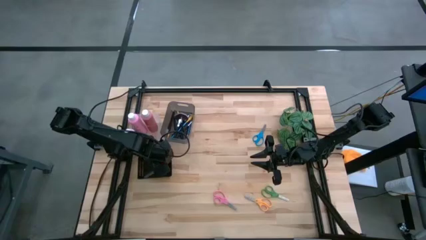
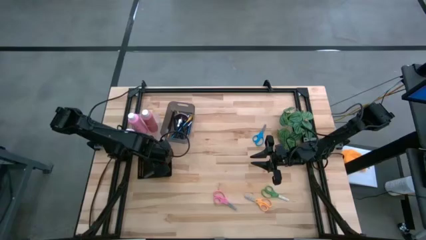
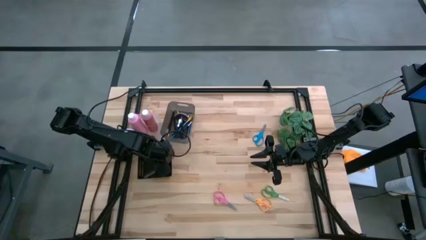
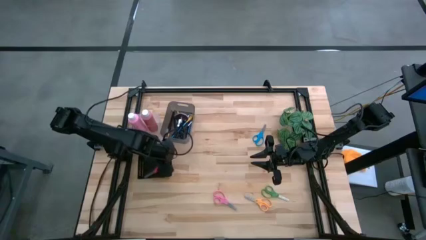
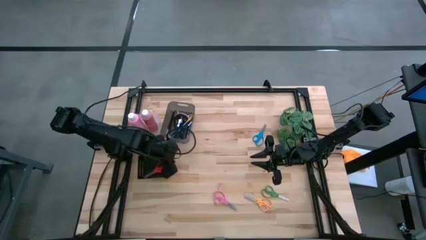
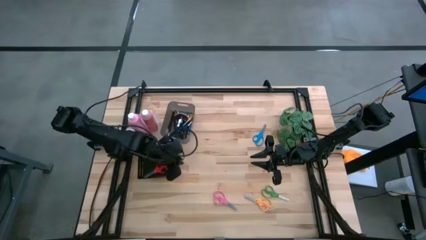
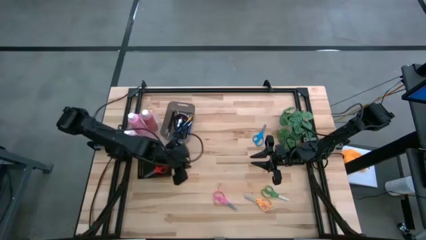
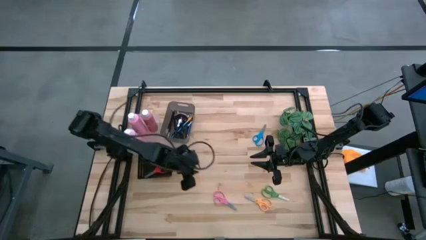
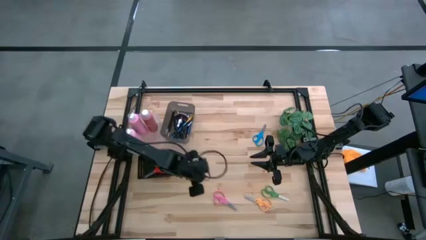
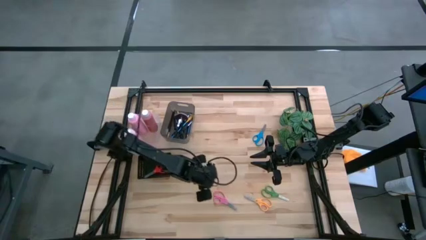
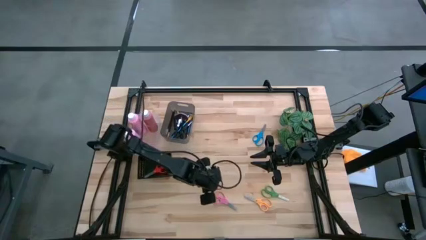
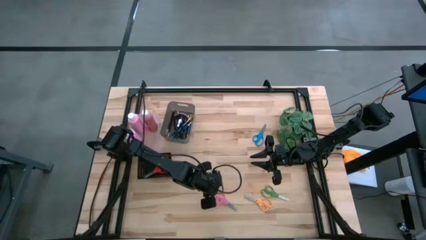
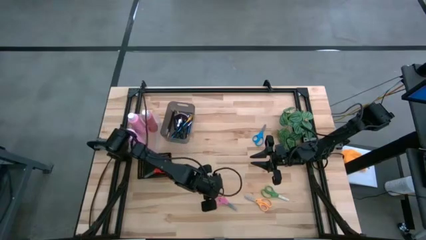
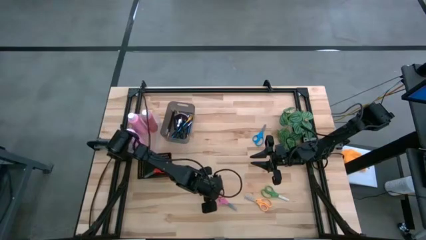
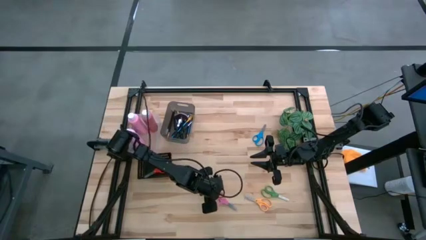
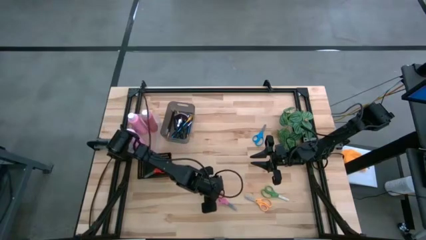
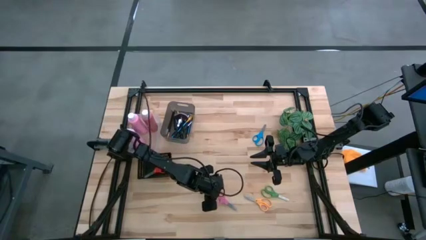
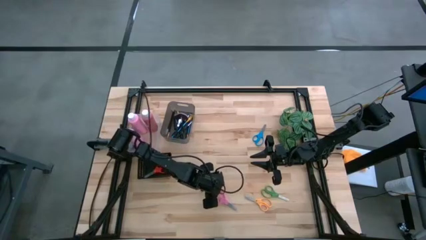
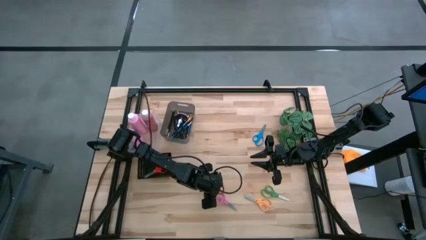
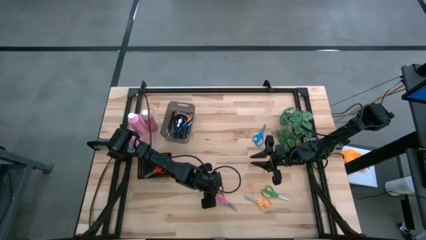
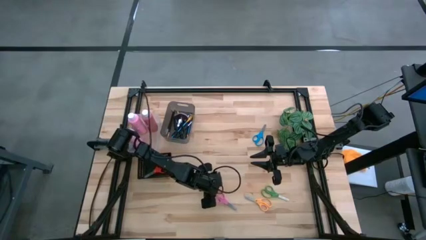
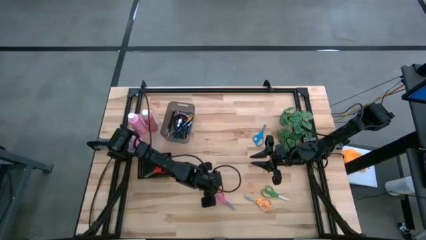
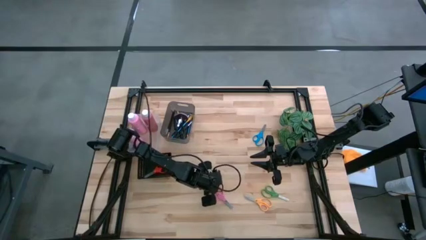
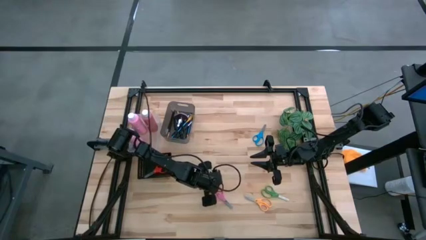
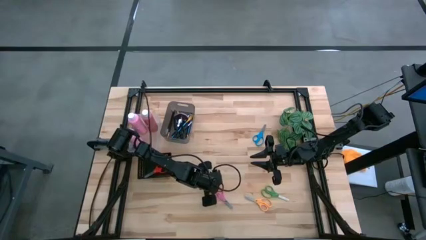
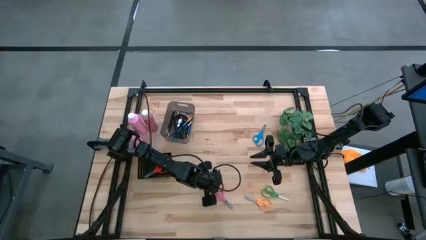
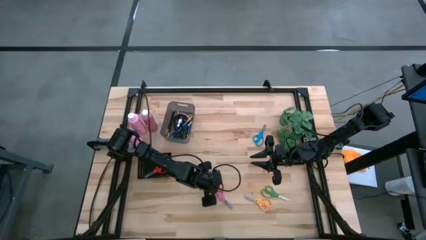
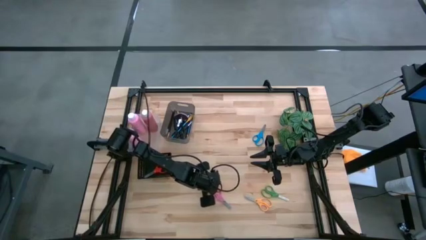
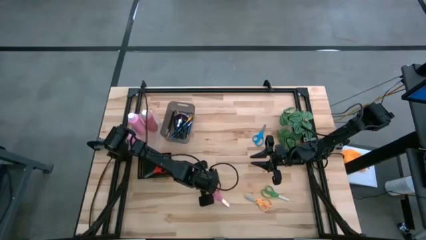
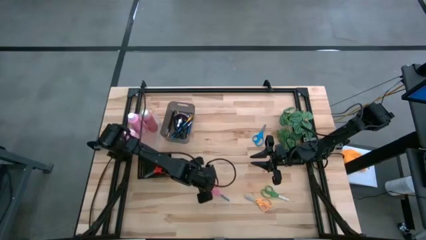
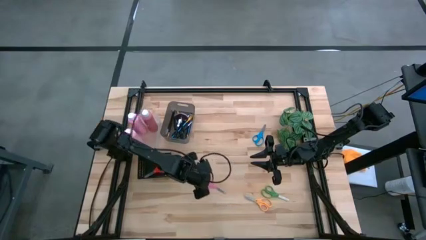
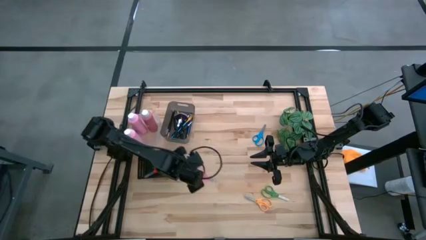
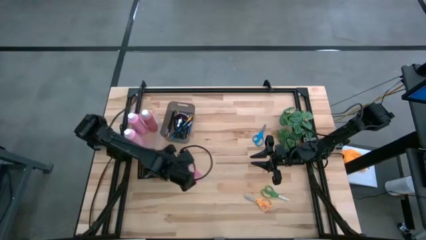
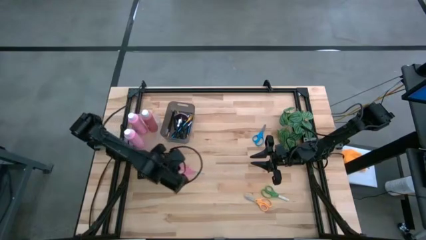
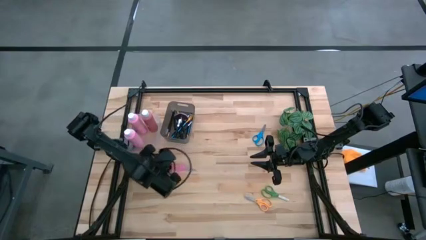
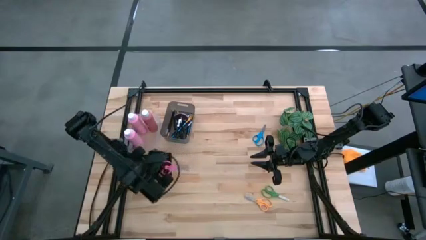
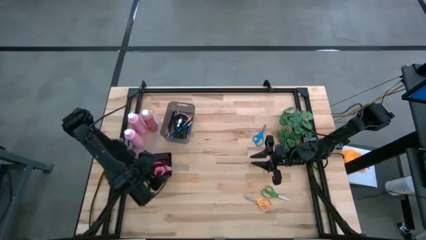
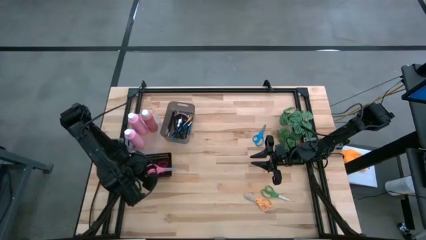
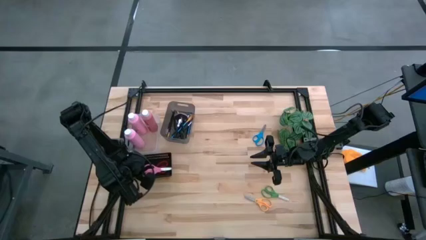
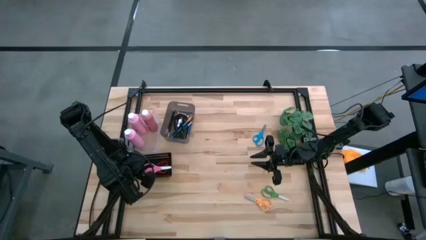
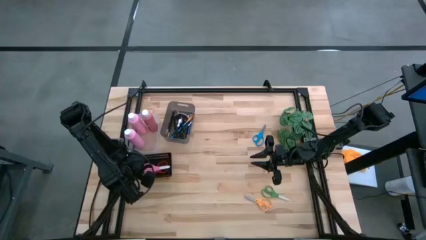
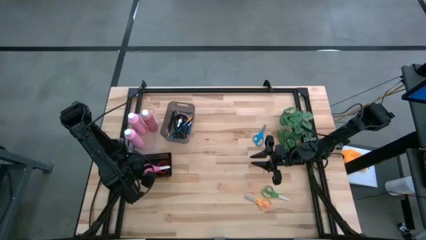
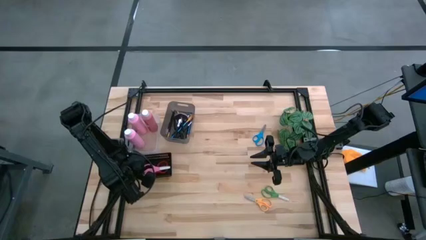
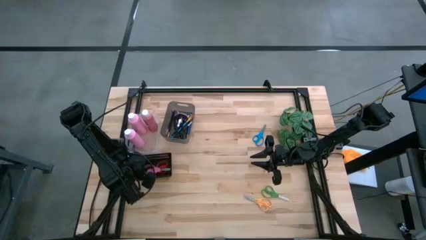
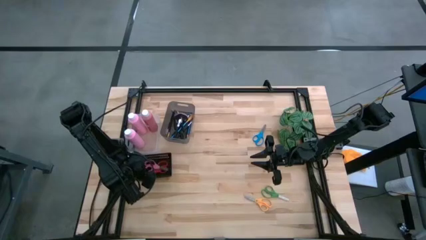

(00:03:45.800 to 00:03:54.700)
Task: Pick & Place Paint Supplies
Put the pink scissors into the black basket

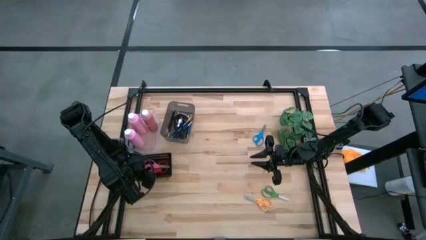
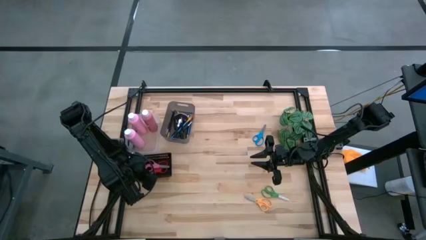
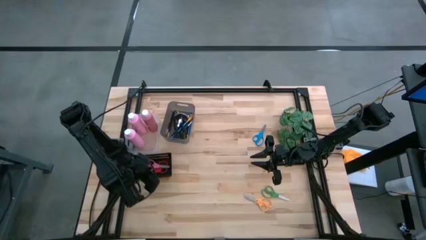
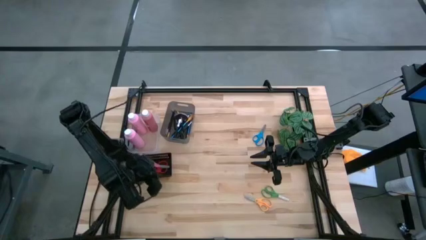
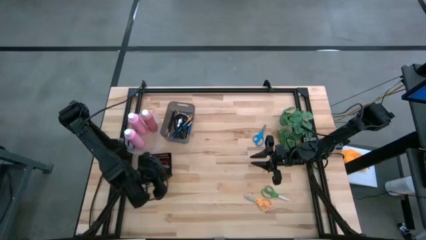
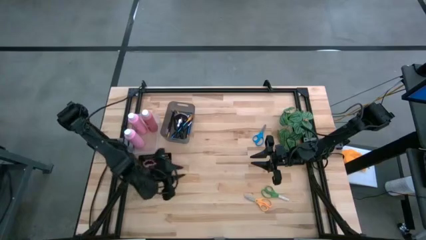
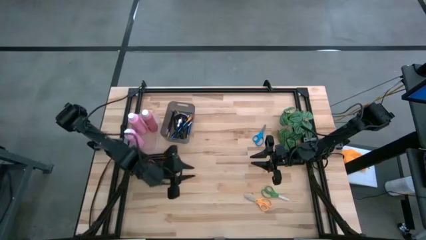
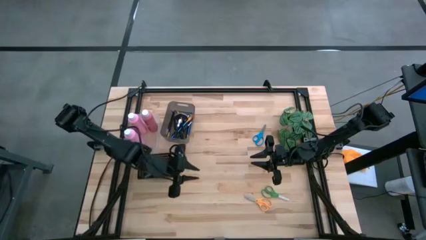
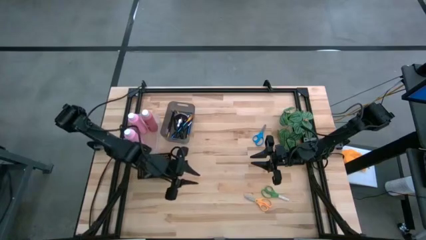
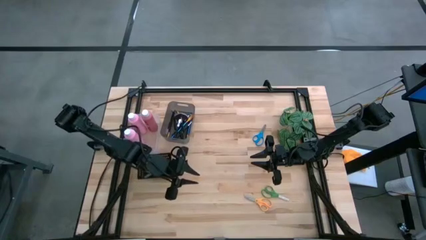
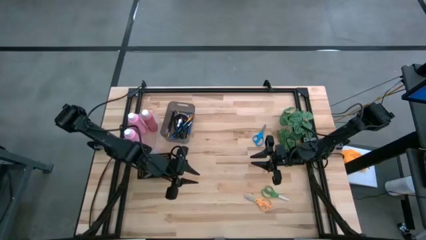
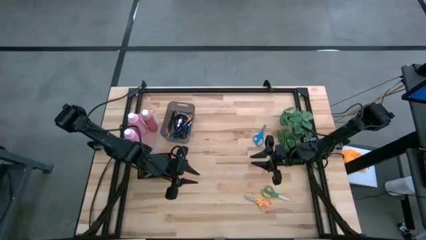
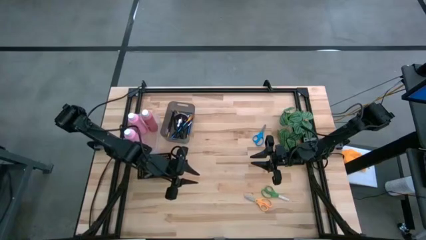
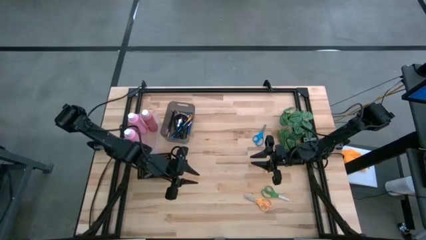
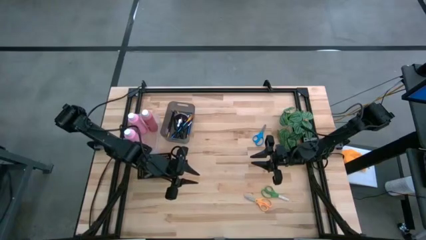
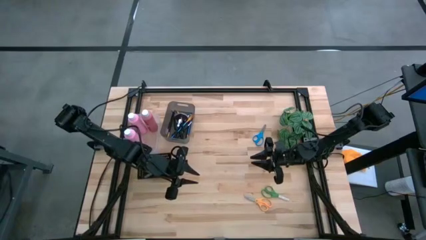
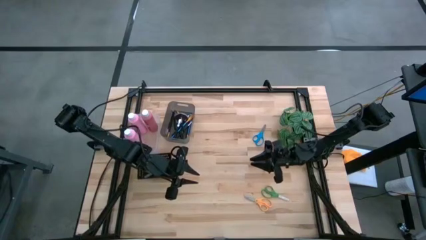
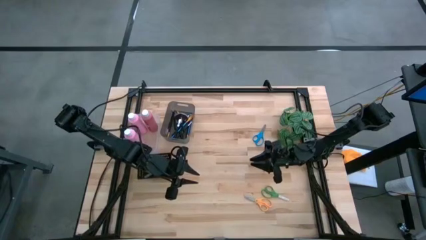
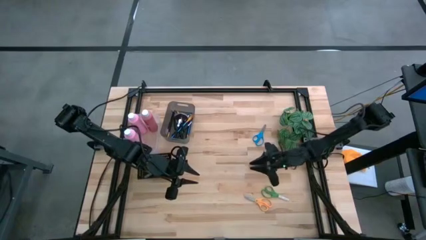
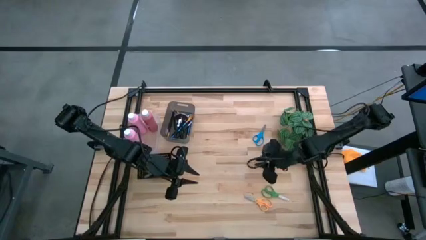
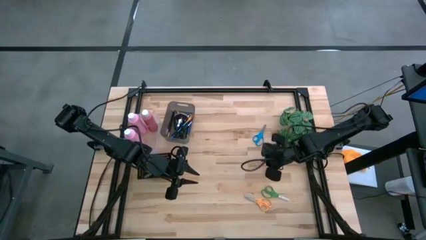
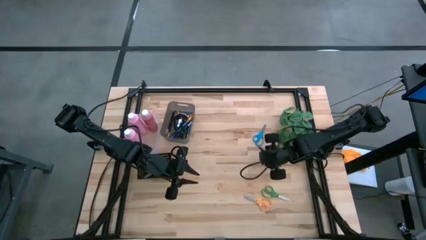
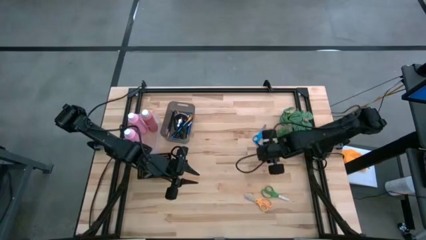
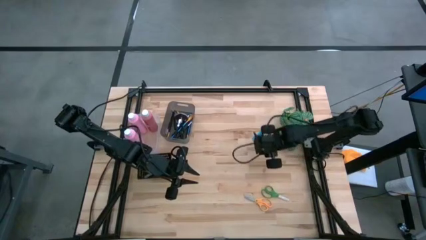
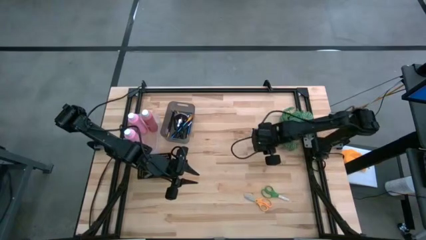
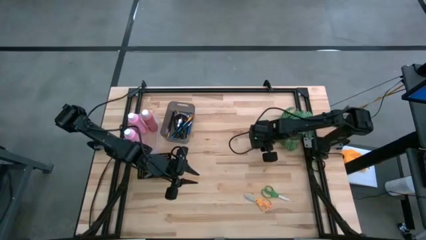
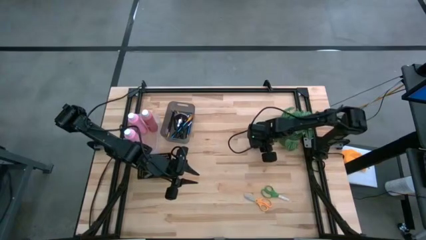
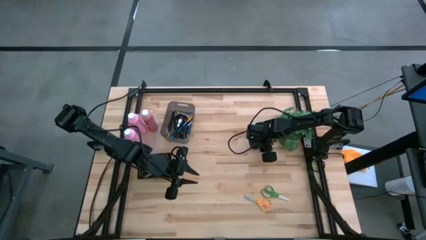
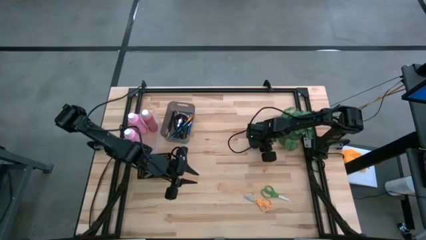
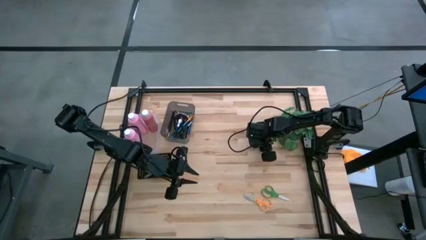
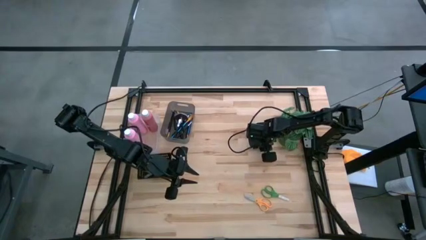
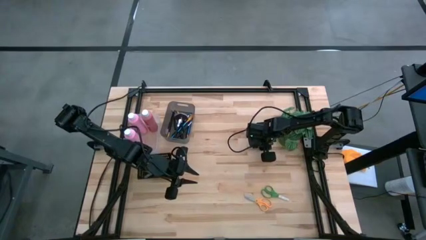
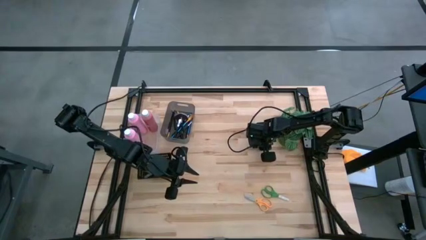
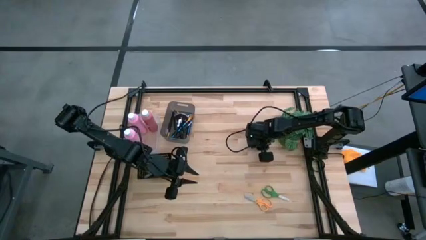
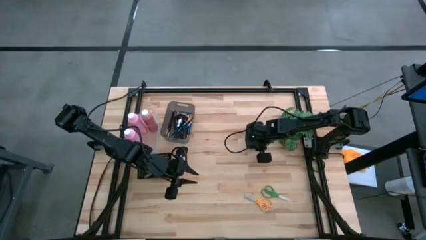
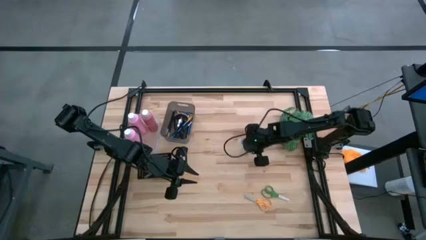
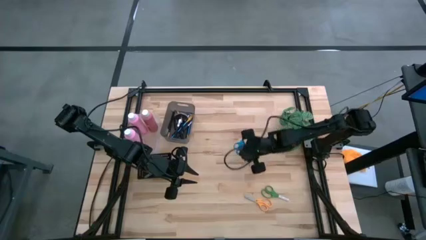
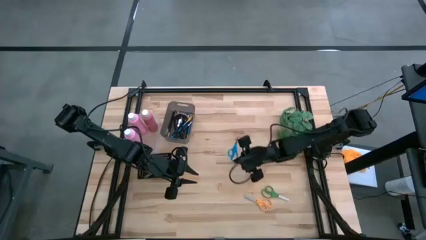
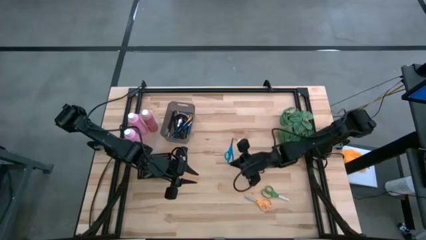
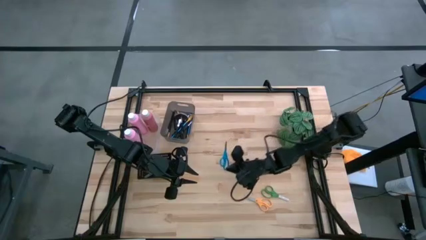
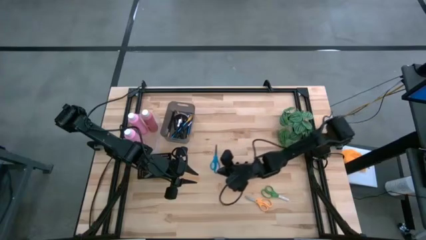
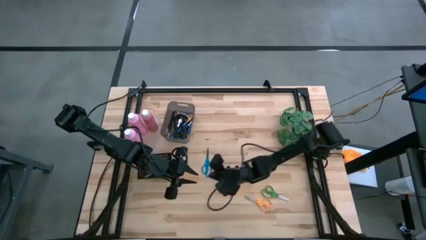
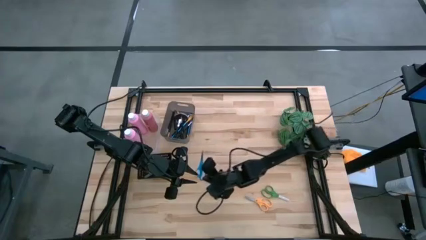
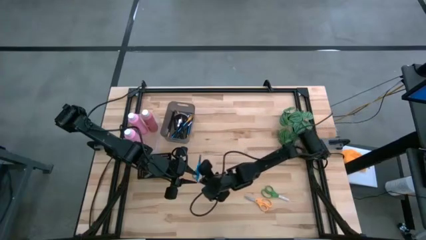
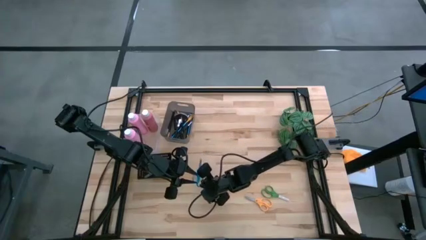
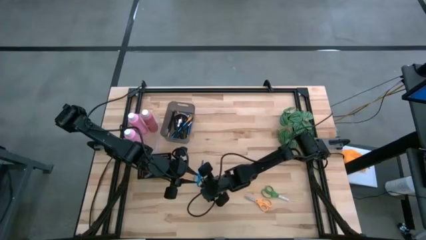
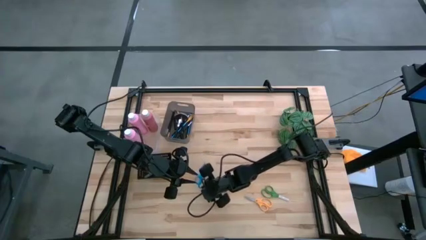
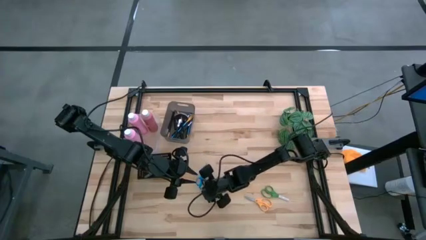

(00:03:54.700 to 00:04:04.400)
Put the blue scissors into the black basket
